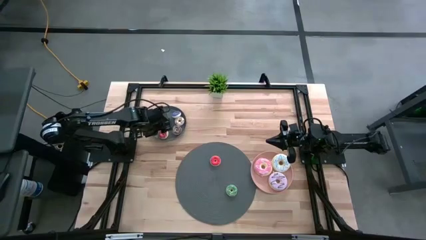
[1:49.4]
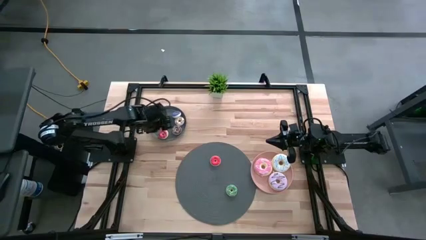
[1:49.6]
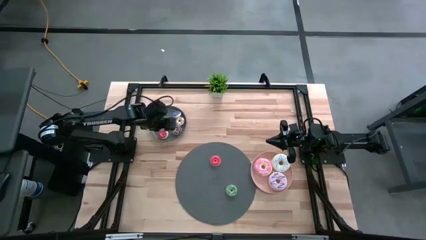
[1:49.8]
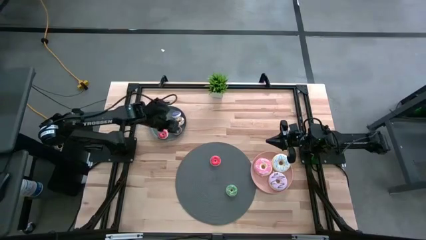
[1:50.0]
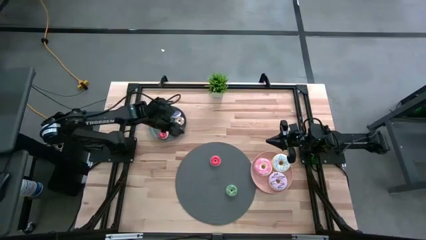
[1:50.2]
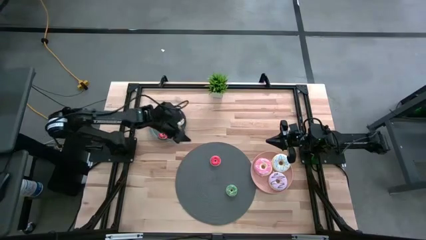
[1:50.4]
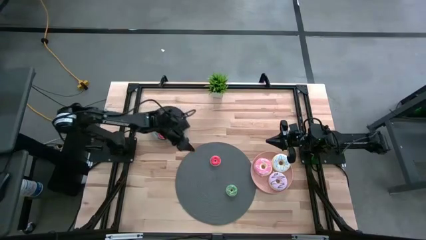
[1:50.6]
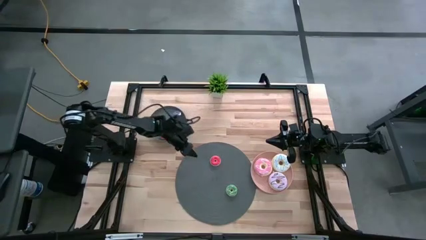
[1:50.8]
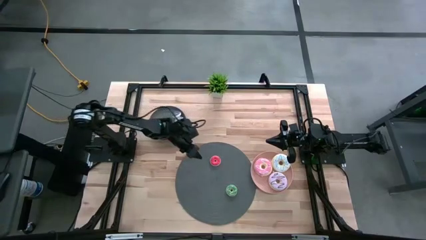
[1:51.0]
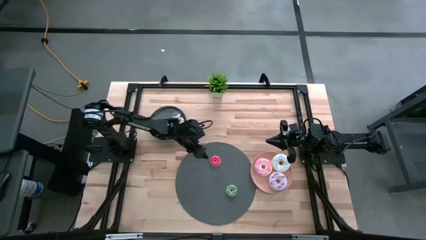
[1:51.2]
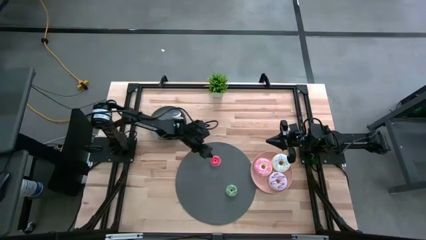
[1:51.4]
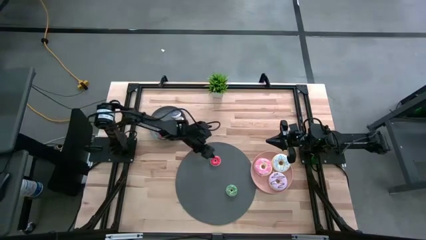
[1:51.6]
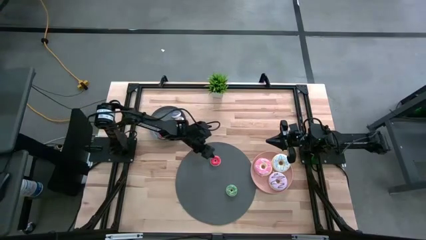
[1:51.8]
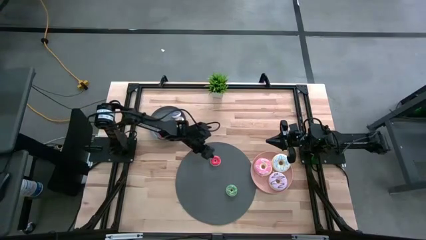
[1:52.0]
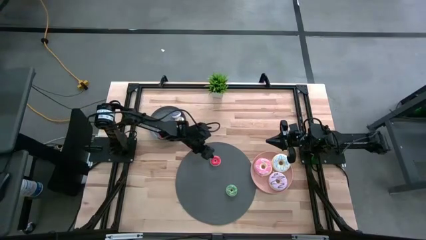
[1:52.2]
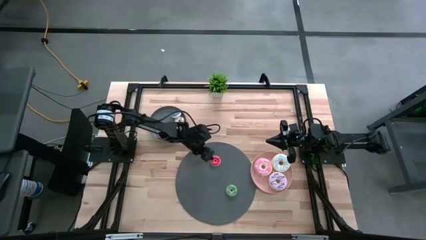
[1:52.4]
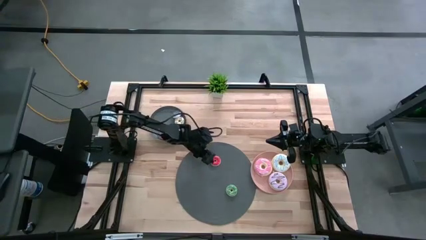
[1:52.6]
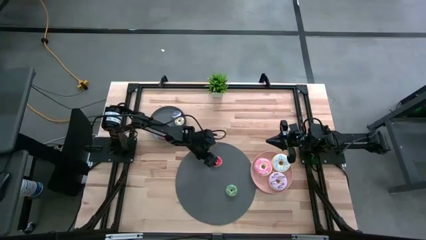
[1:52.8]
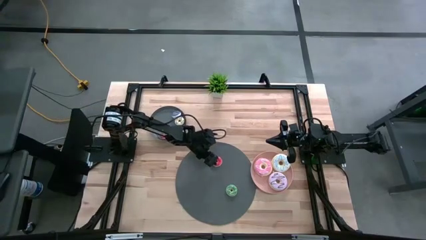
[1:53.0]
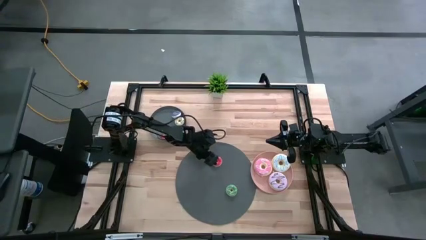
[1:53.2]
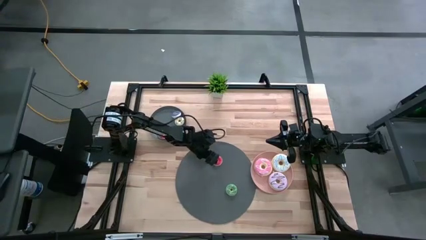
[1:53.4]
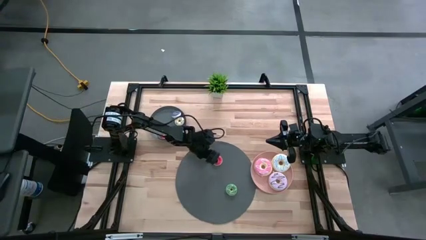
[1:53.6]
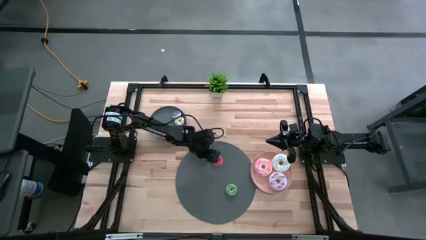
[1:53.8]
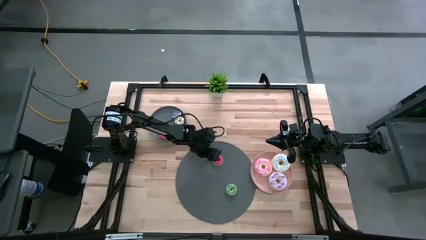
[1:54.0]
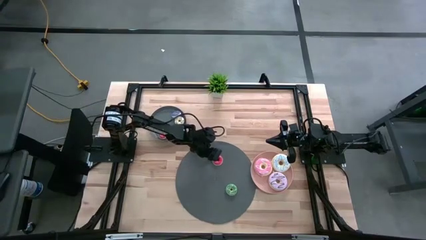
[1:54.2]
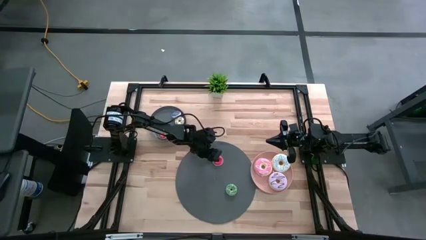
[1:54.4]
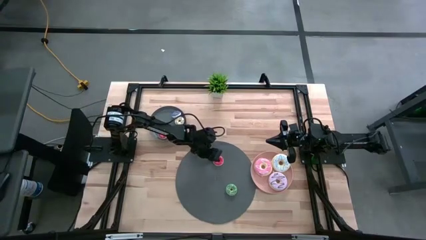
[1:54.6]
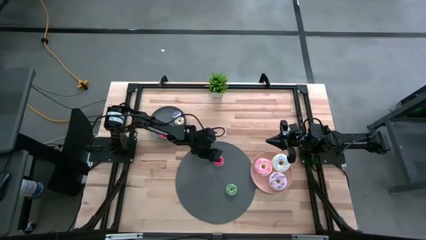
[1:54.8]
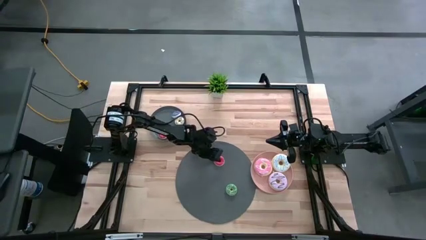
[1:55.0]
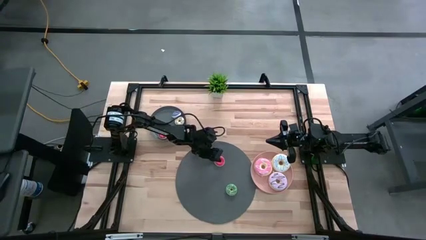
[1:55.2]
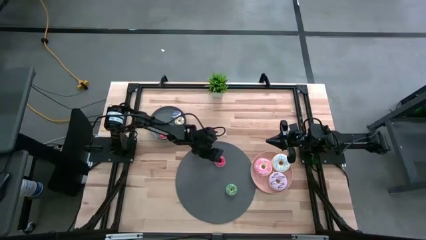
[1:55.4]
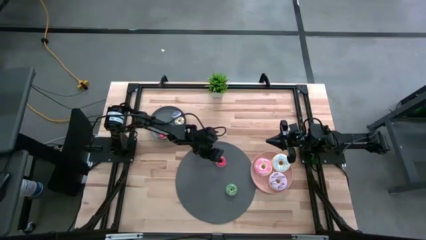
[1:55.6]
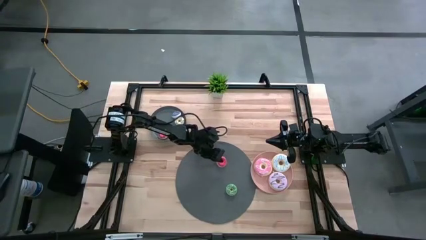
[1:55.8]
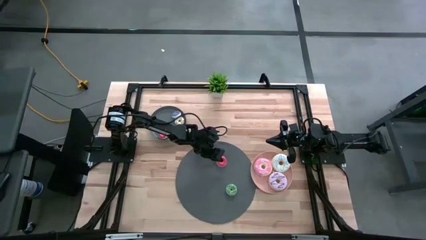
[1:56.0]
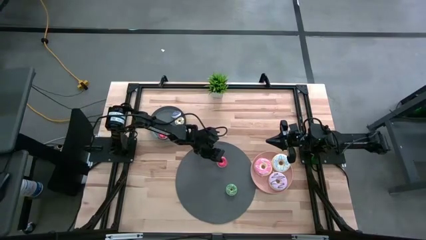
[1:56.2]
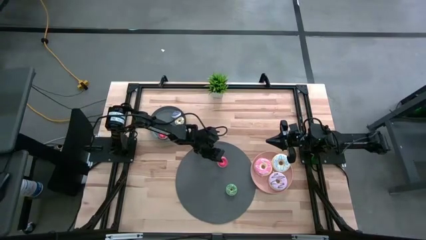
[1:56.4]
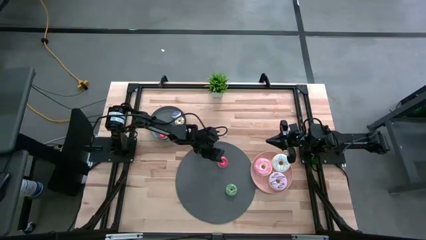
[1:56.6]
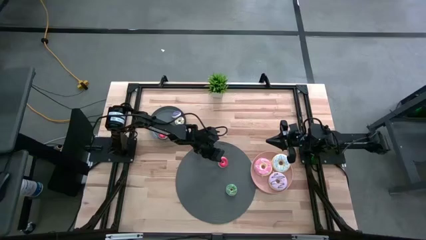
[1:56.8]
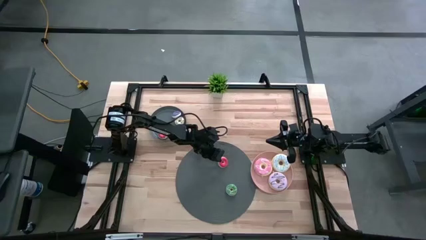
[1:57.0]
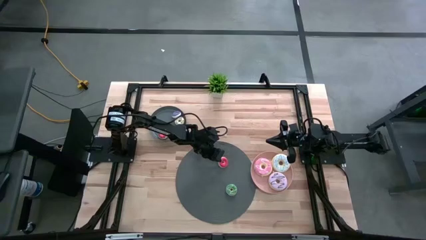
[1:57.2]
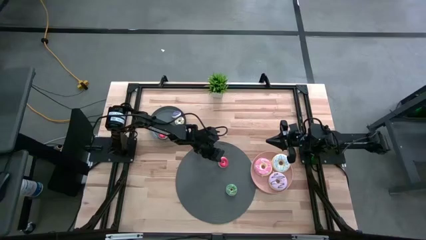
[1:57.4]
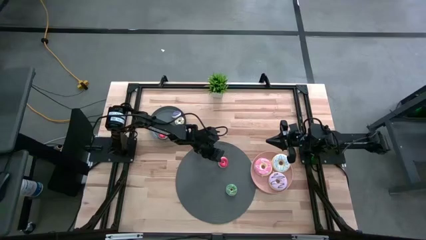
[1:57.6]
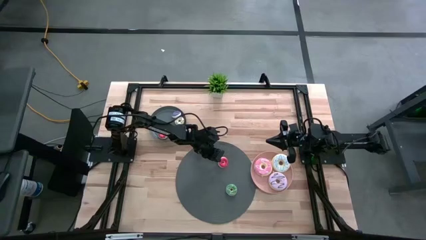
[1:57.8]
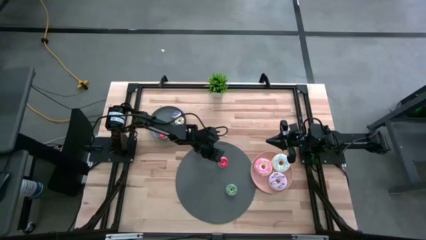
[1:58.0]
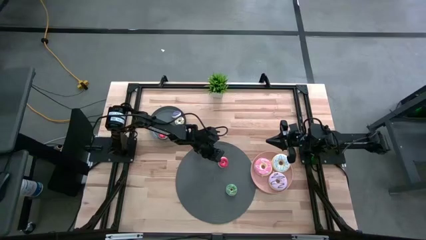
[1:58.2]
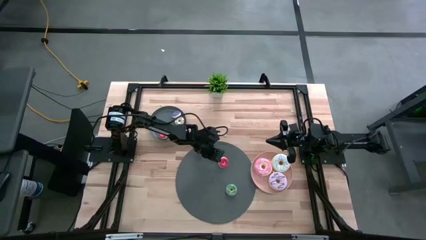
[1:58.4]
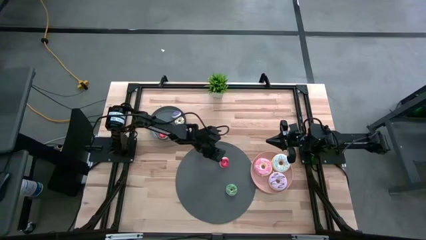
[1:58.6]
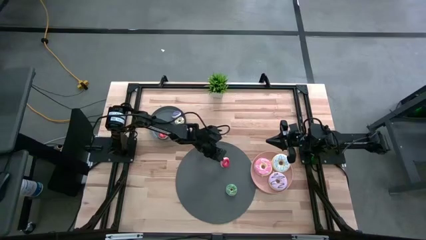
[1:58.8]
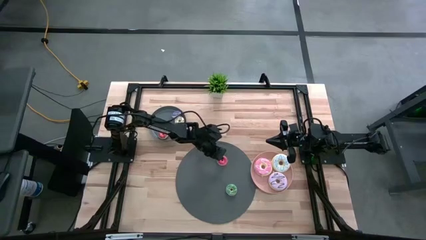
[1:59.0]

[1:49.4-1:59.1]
Task: Pick & Place donuts
Put the small red donut on the gray plate

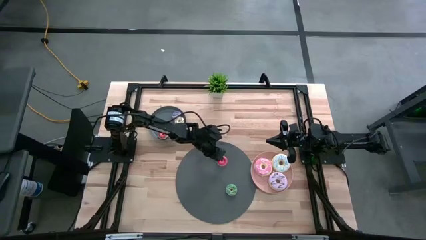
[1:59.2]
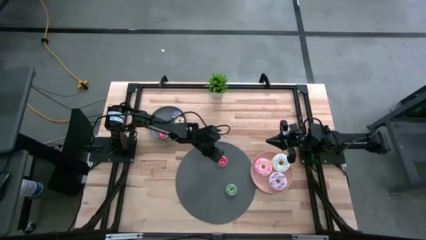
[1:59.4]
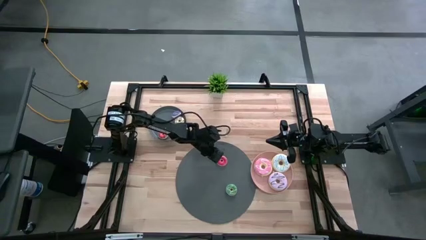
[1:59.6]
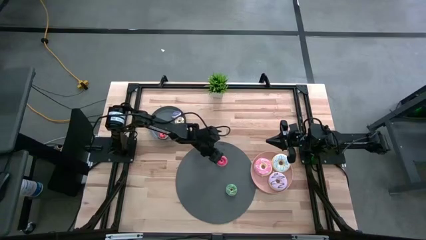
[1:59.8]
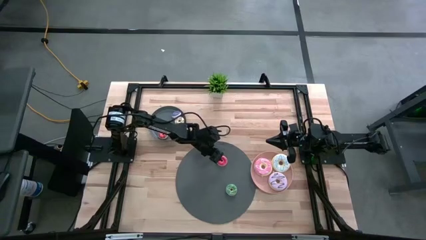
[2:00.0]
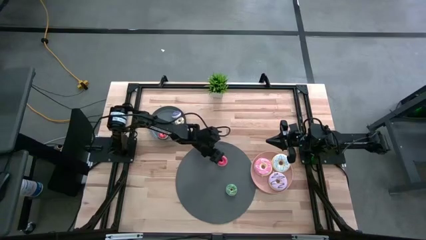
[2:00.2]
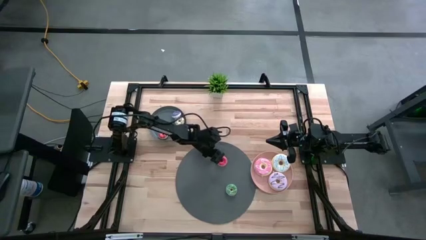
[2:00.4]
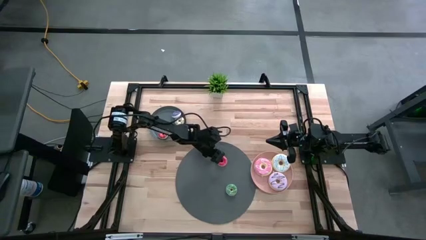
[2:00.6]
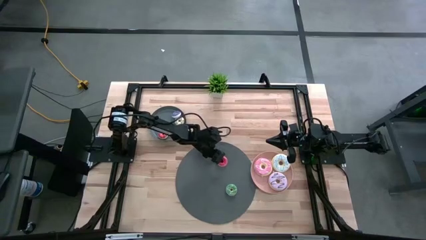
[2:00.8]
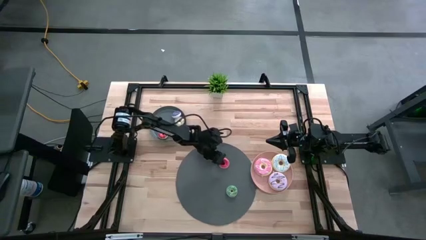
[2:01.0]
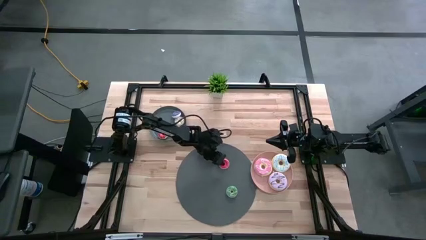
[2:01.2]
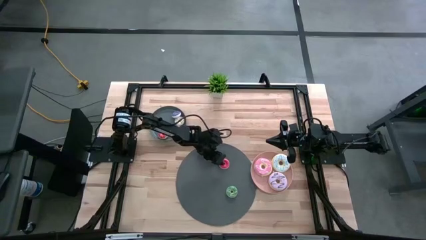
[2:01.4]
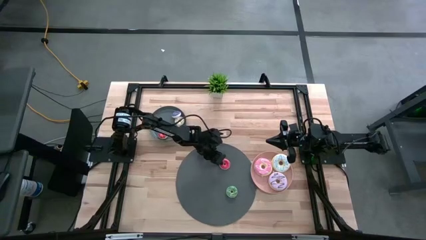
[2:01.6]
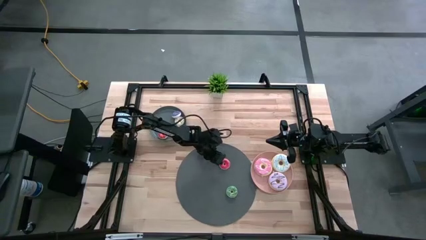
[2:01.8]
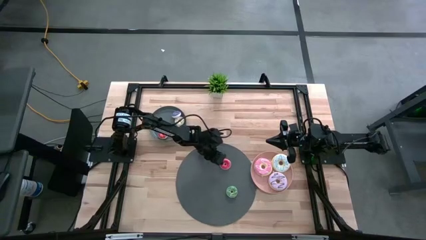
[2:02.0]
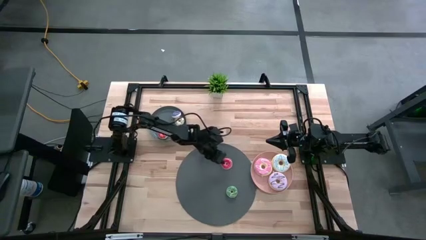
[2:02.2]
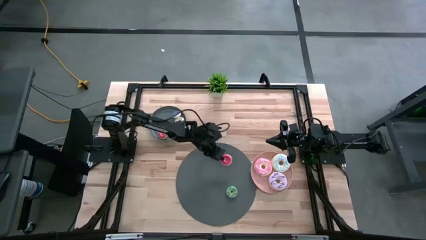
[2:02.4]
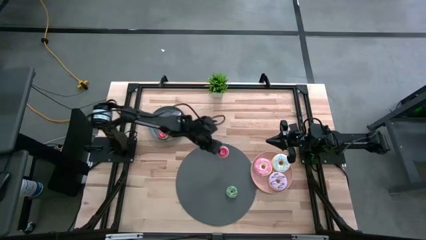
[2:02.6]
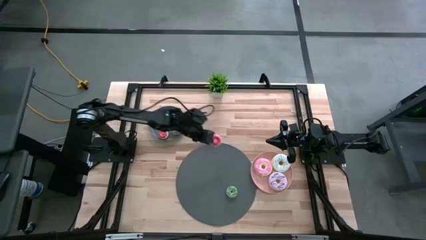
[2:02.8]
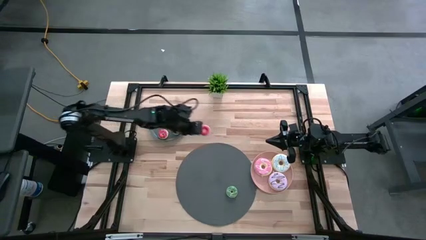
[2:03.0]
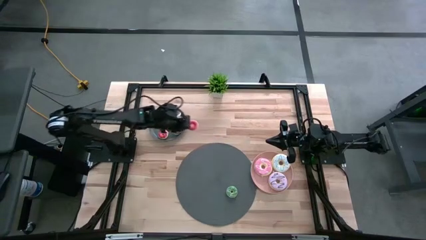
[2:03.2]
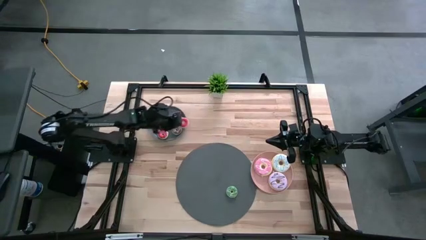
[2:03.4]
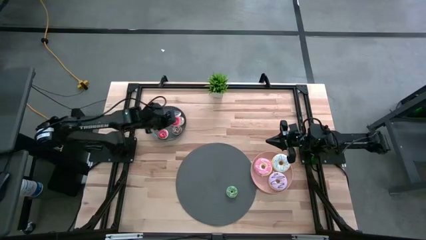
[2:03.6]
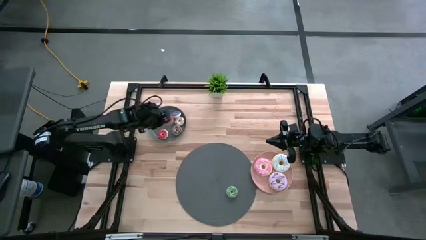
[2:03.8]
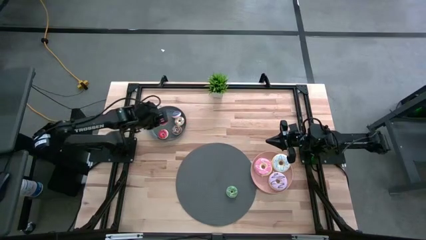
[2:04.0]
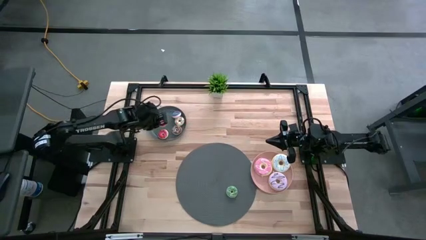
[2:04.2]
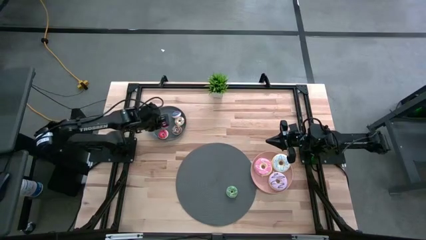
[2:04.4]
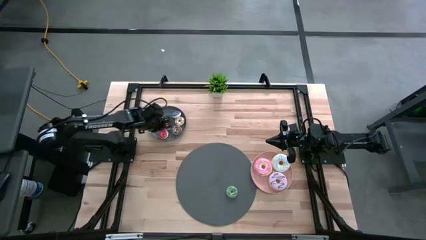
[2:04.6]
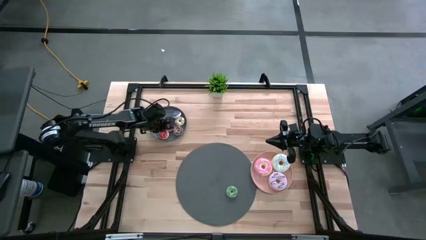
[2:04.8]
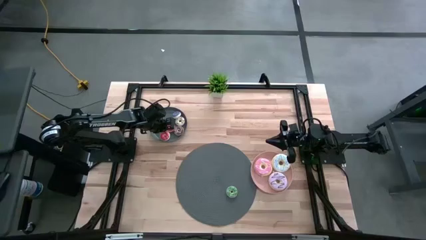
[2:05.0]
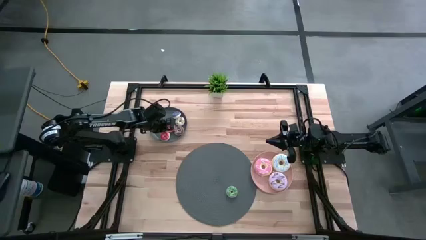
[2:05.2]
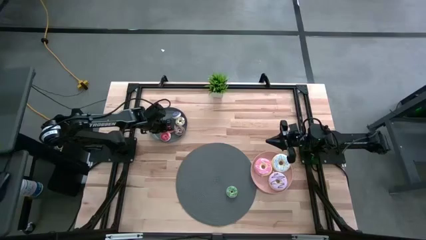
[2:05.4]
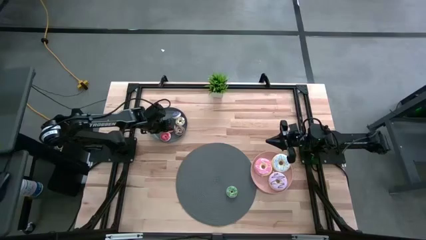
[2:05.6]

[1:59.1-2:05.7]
Put the small red donut on the gray plate
